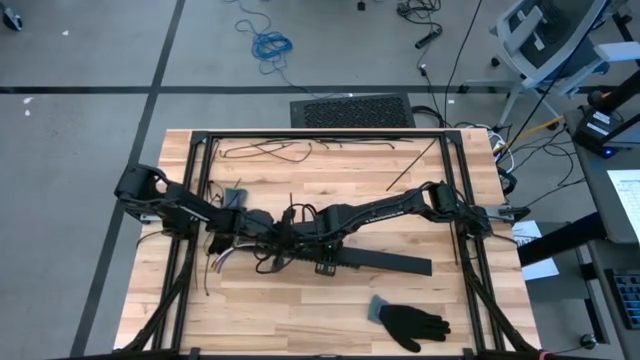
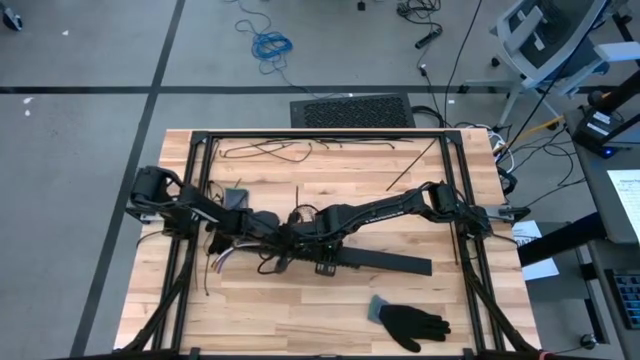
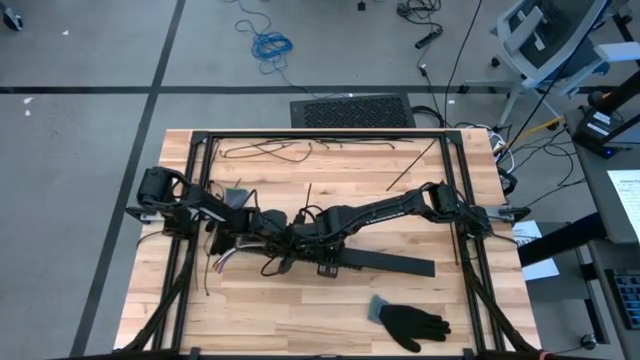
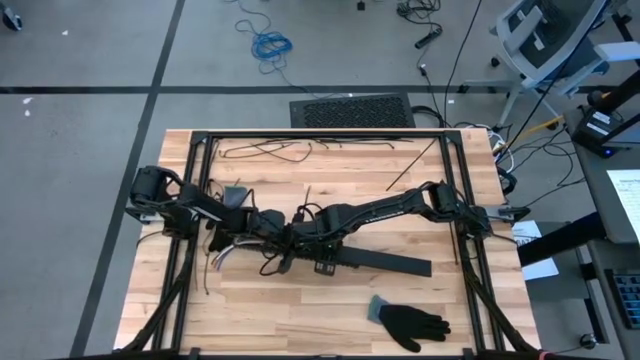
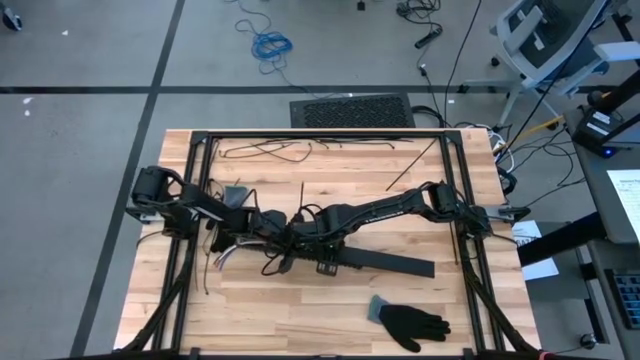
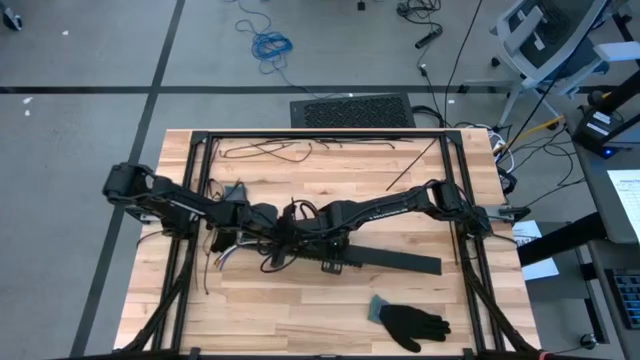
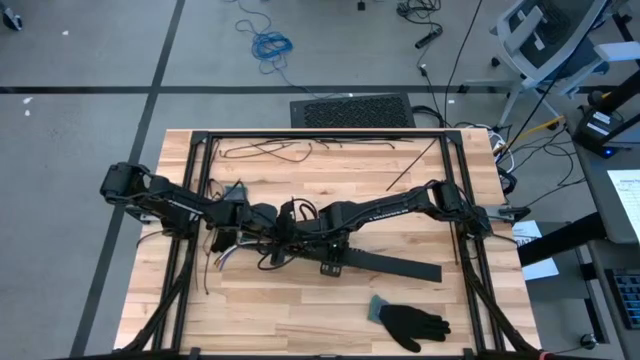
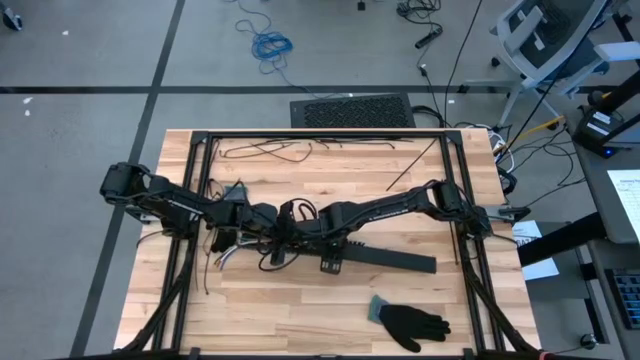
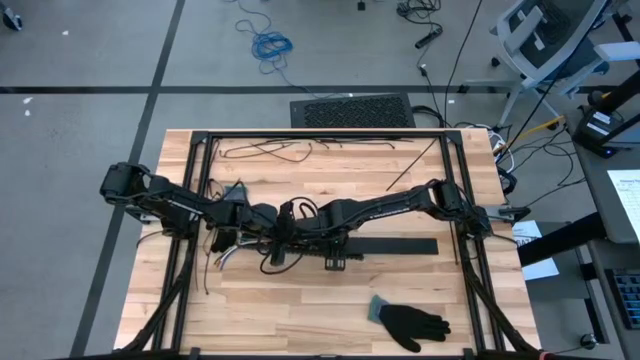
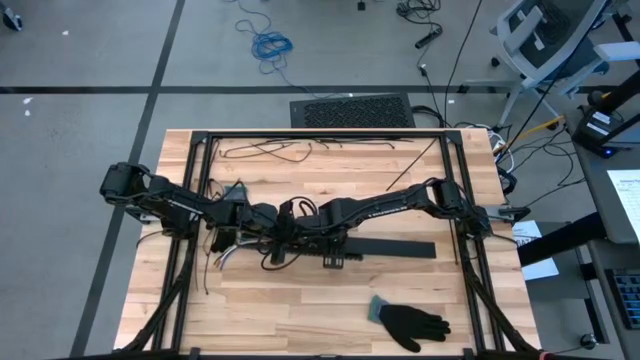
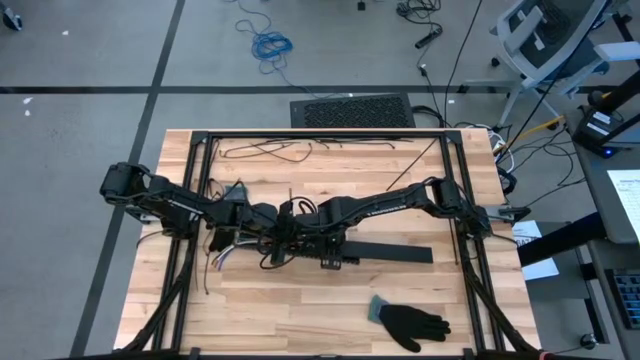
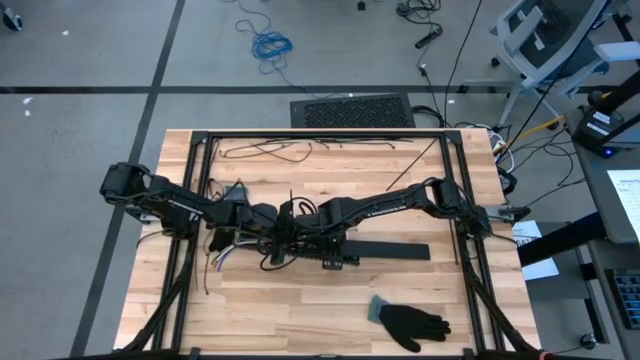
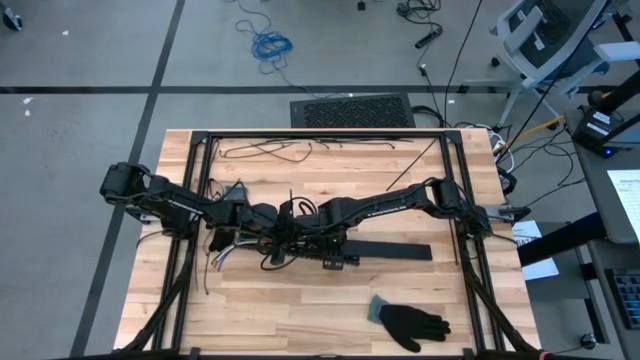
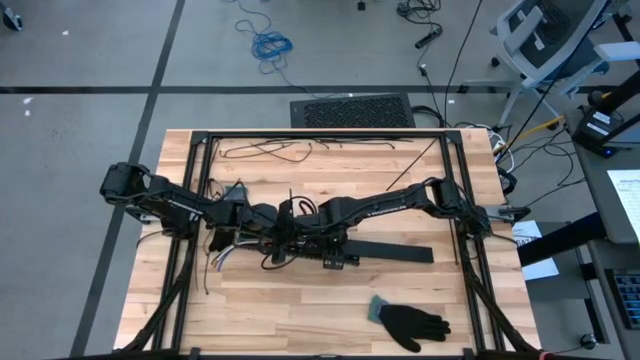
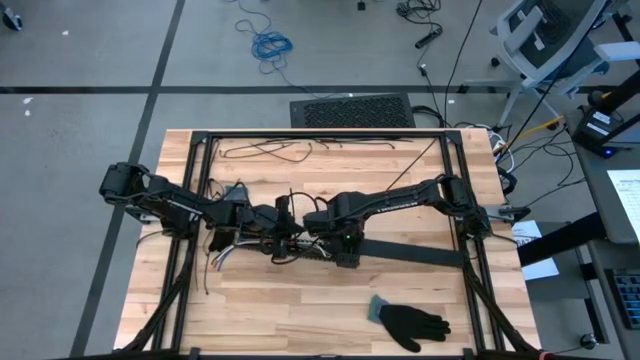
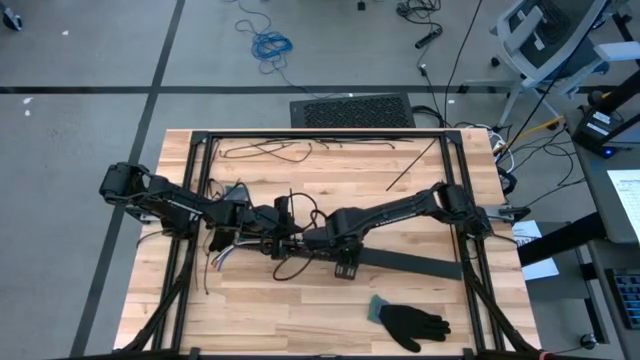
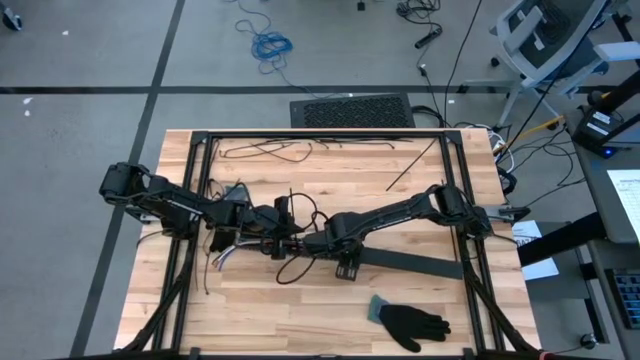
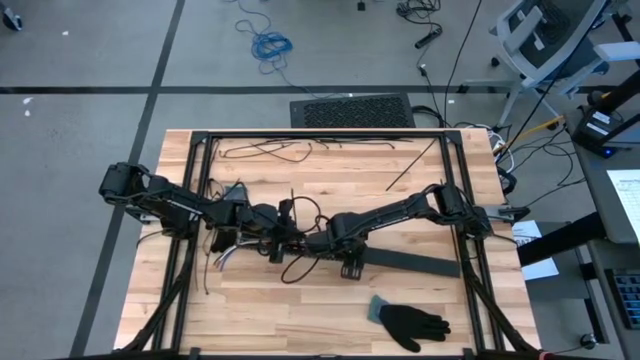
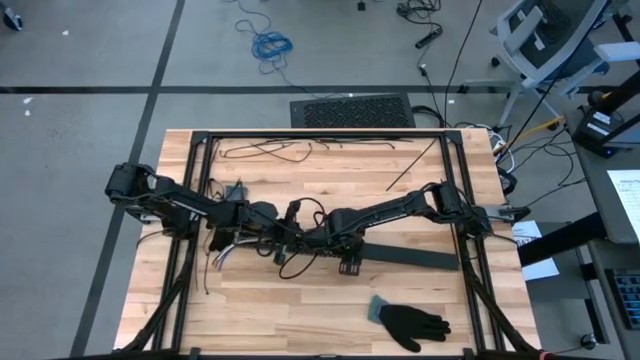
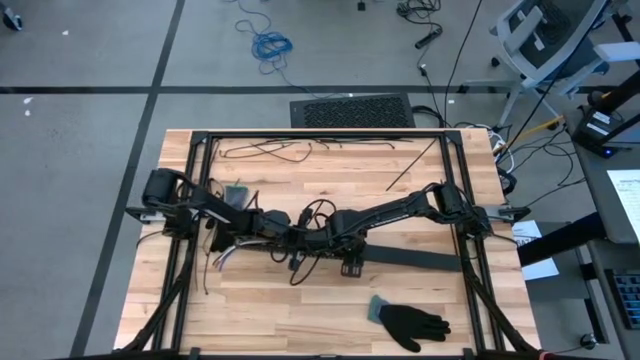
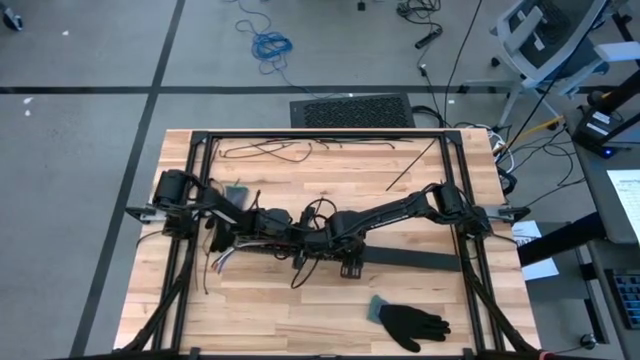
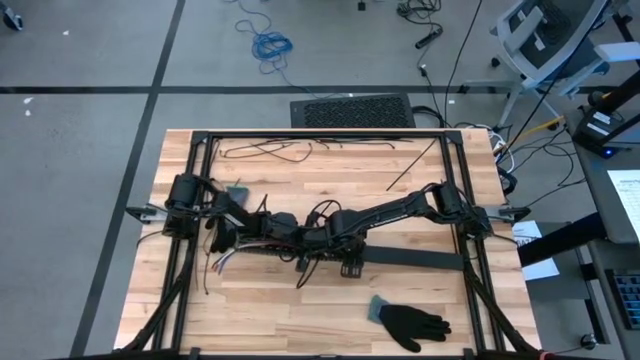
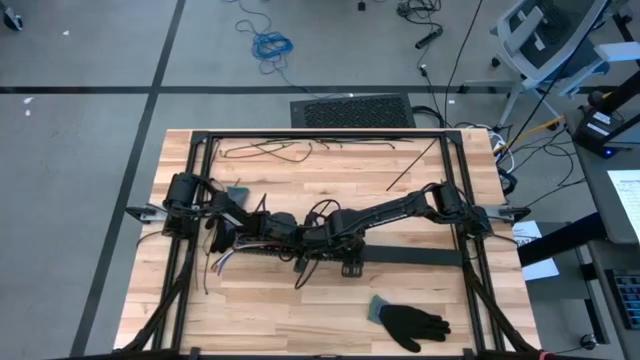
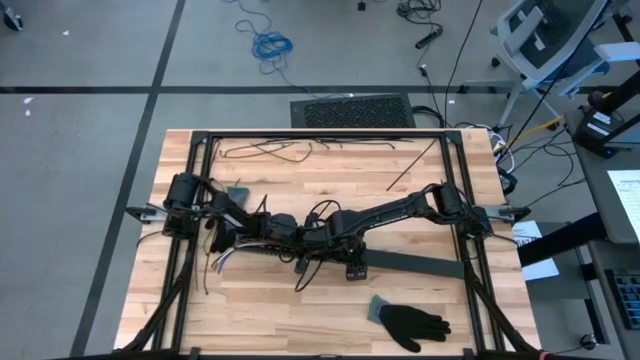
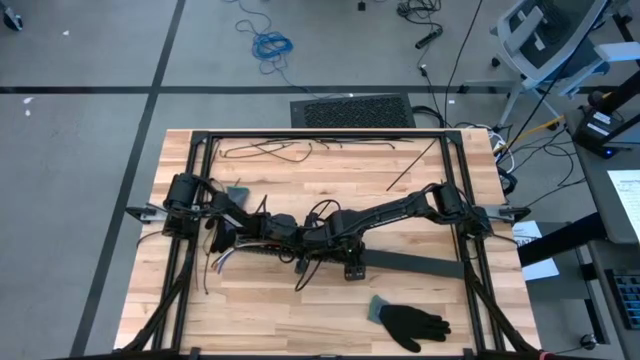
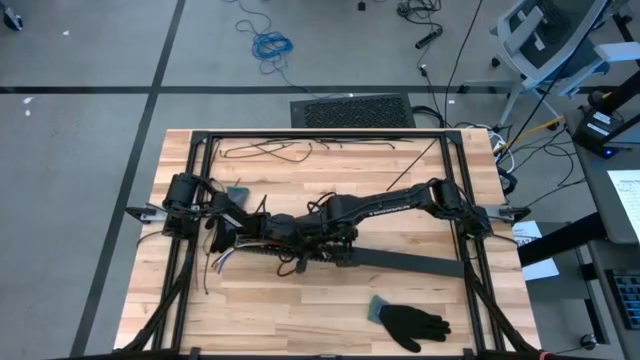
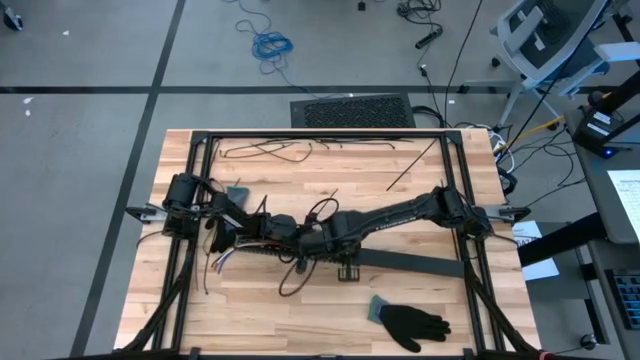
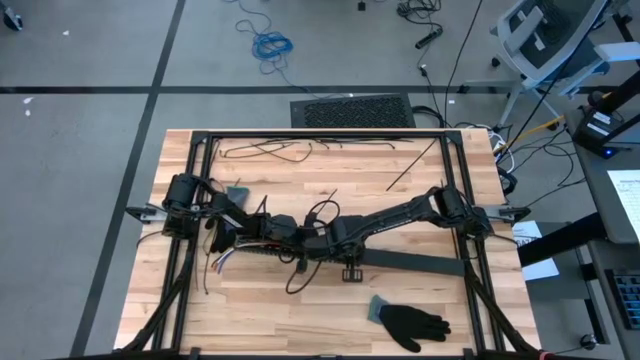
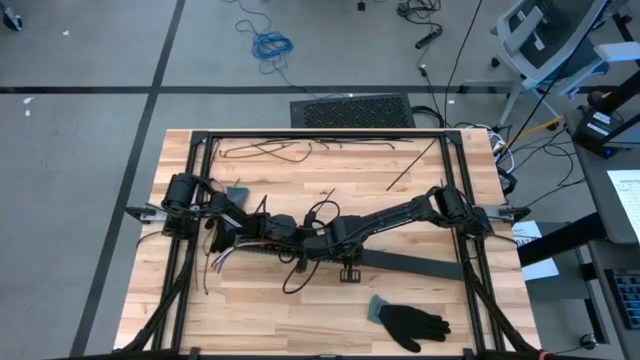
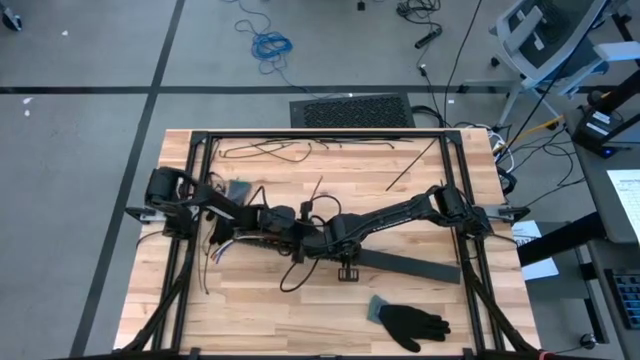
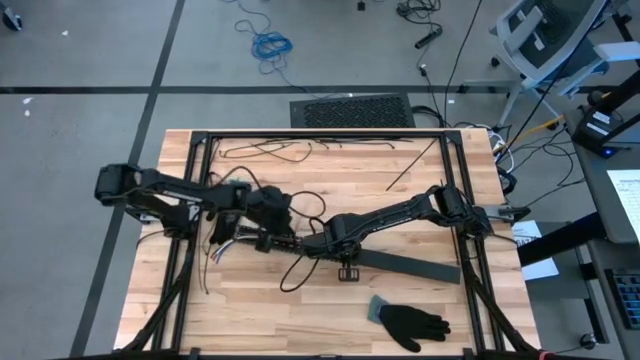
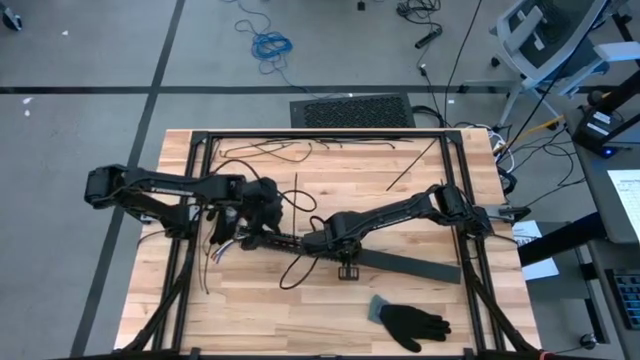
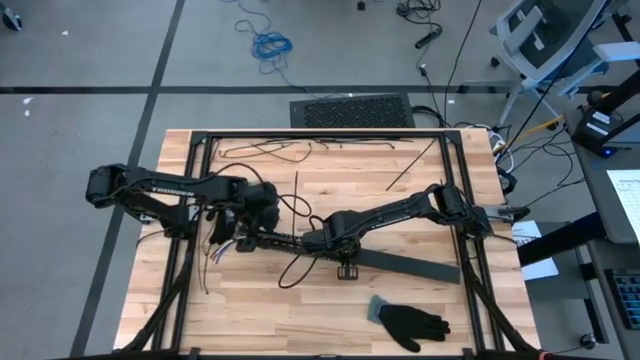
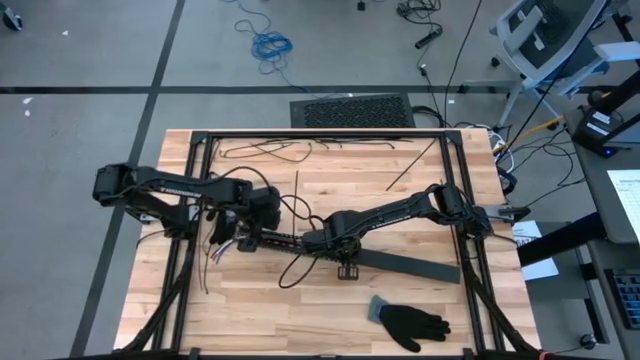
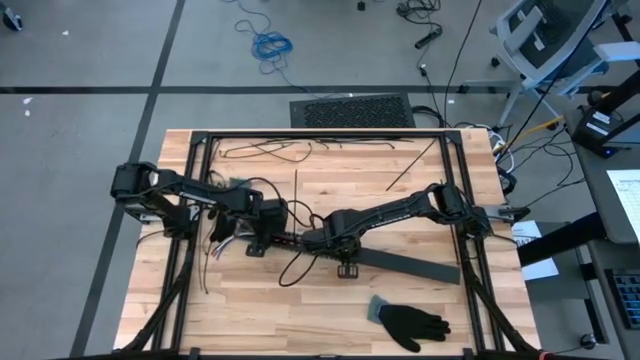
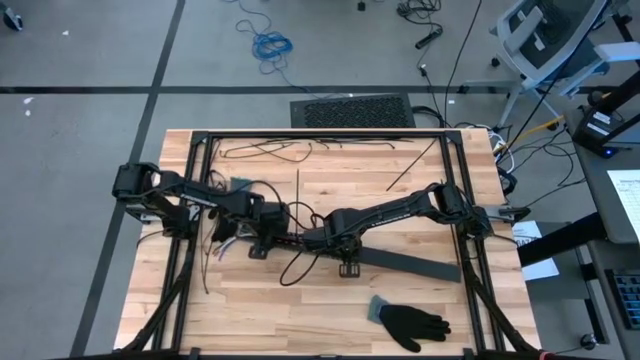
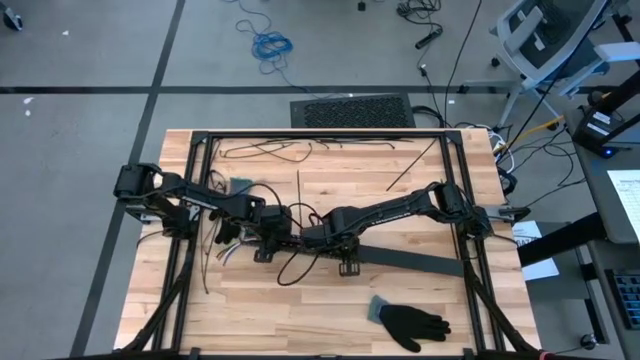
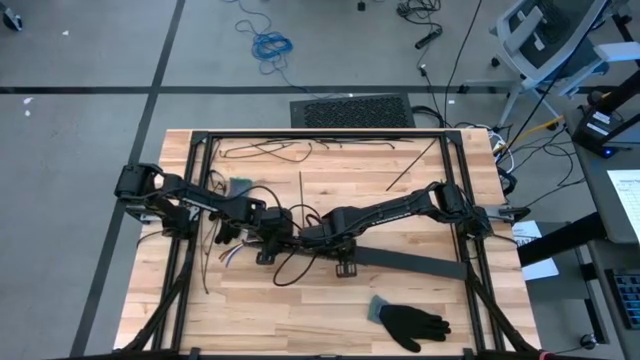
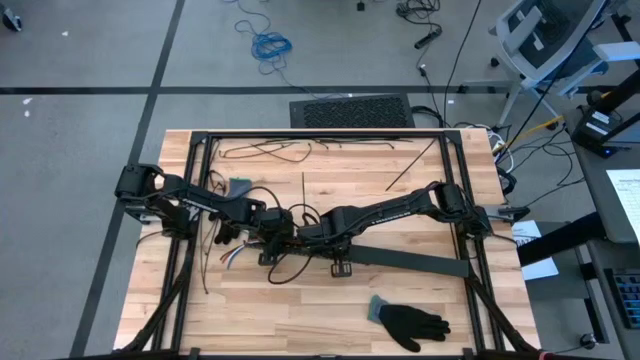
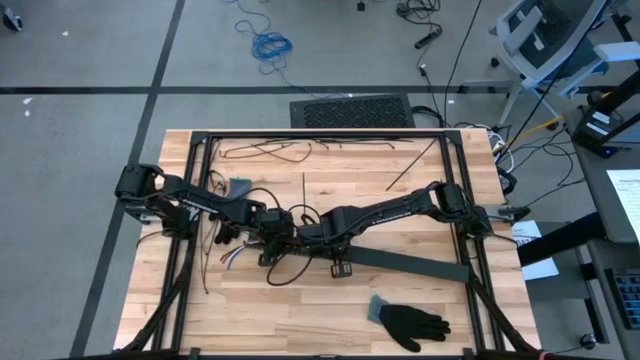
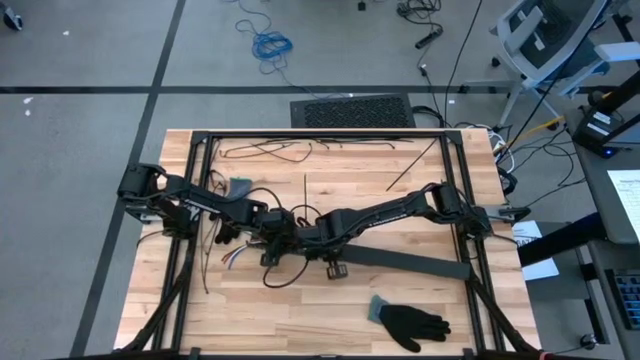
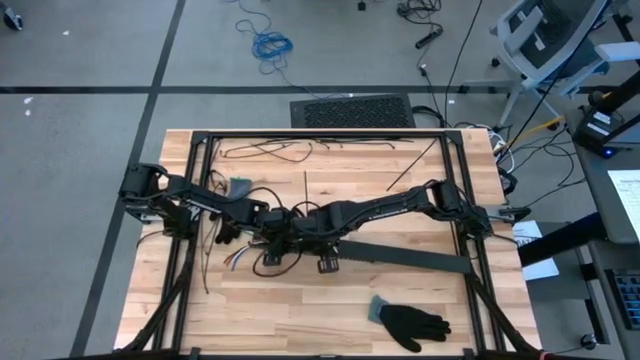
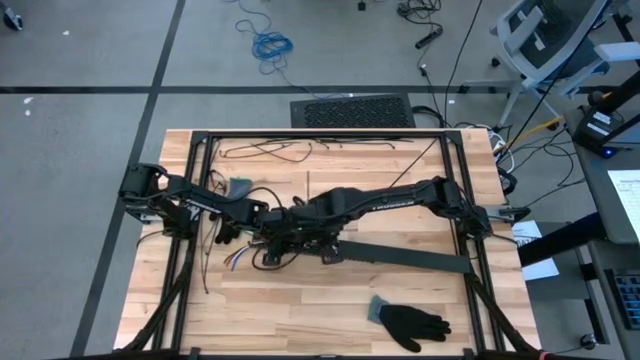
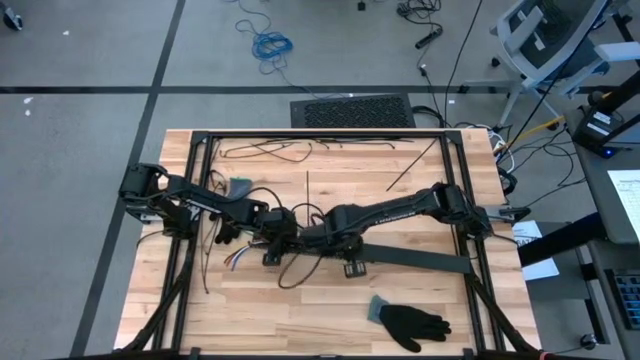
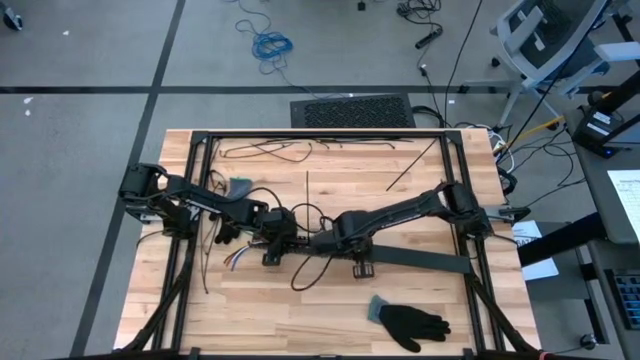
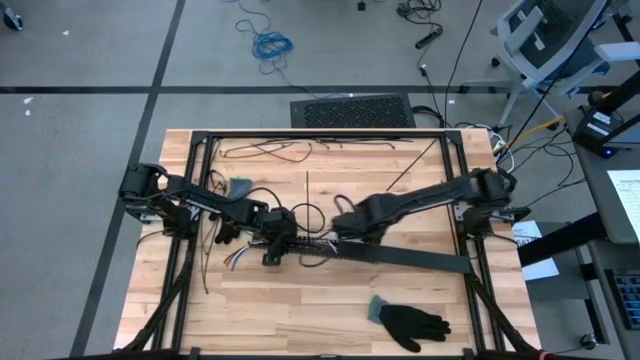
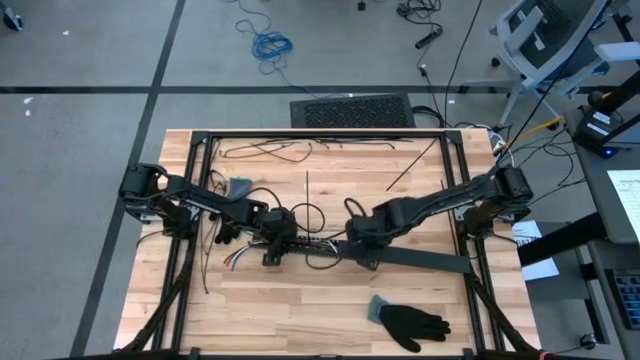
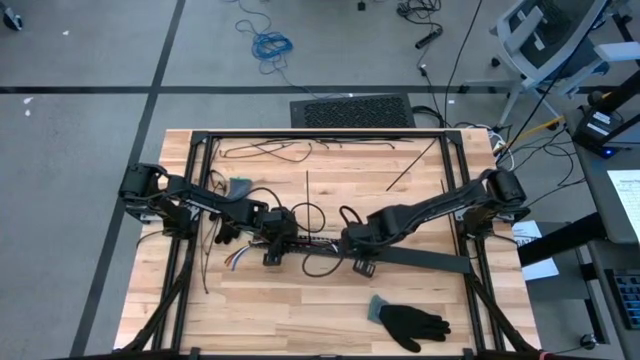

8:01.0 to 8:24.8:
Task: Ziptie cables
Close the cable duct with the cable duct cover
